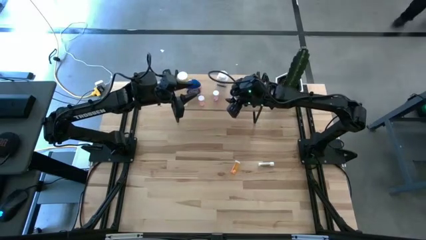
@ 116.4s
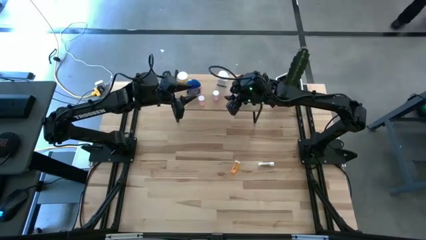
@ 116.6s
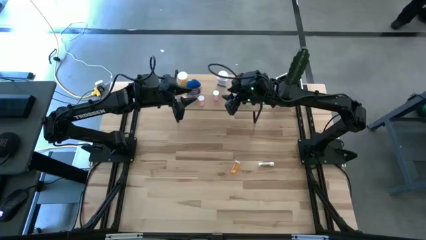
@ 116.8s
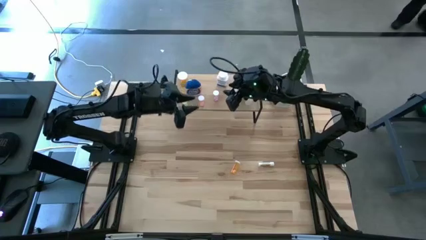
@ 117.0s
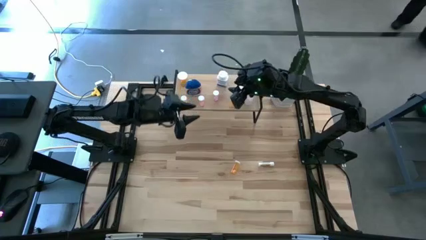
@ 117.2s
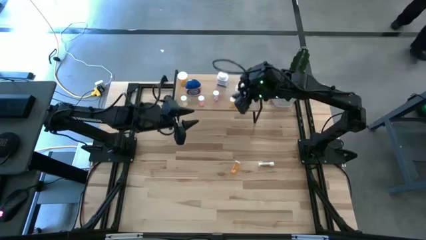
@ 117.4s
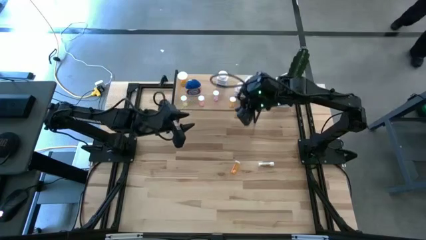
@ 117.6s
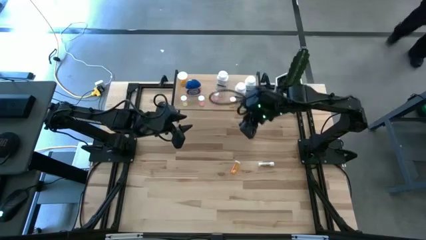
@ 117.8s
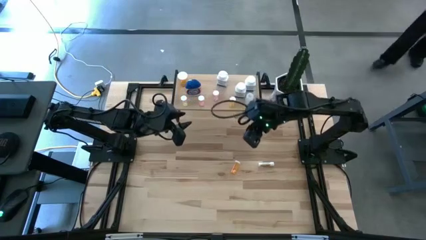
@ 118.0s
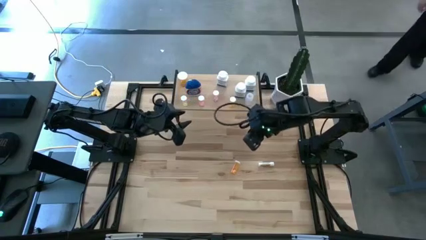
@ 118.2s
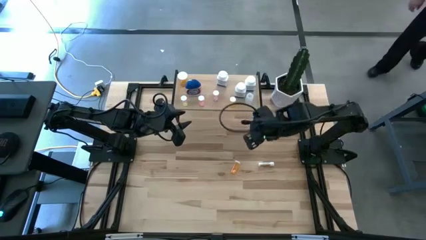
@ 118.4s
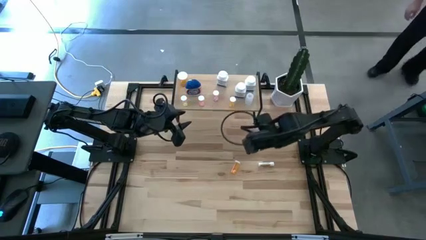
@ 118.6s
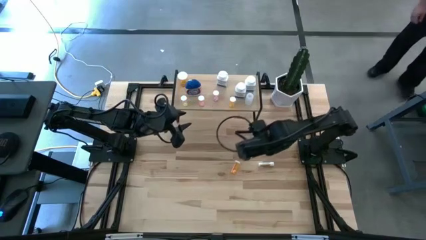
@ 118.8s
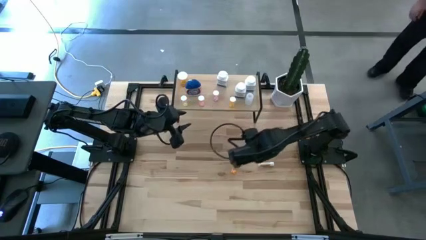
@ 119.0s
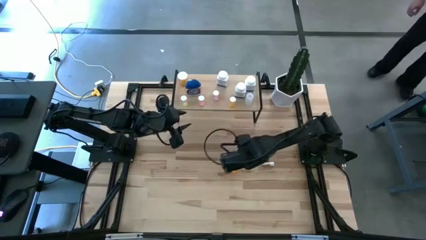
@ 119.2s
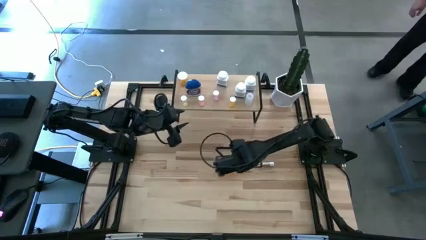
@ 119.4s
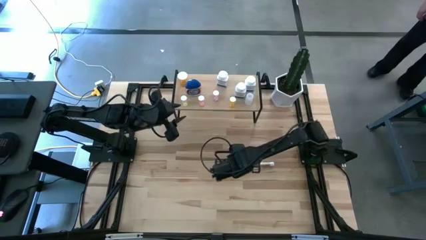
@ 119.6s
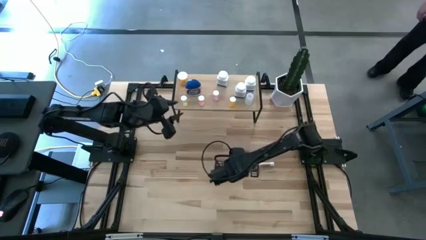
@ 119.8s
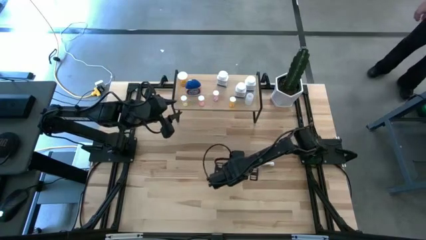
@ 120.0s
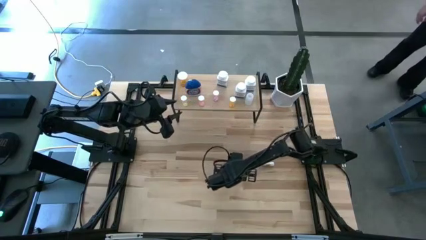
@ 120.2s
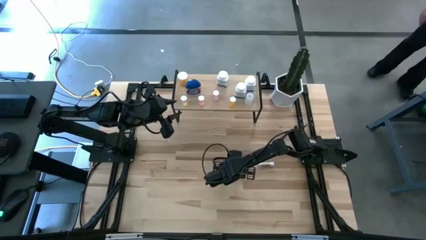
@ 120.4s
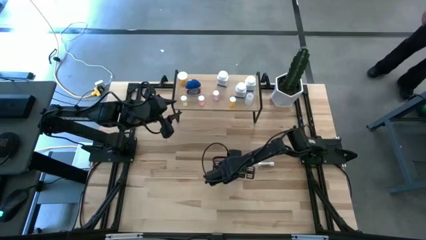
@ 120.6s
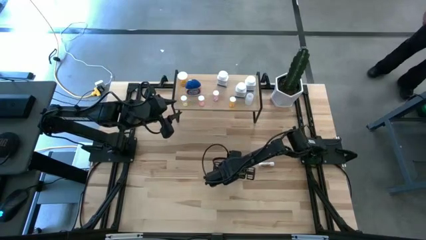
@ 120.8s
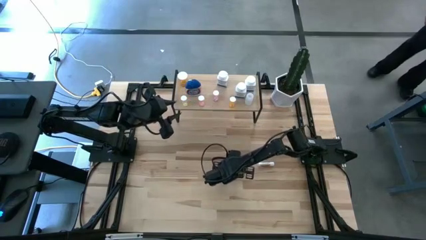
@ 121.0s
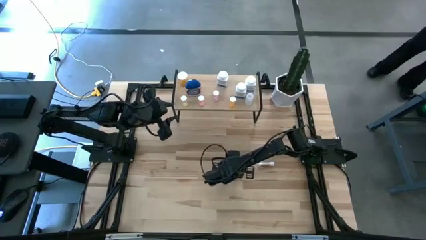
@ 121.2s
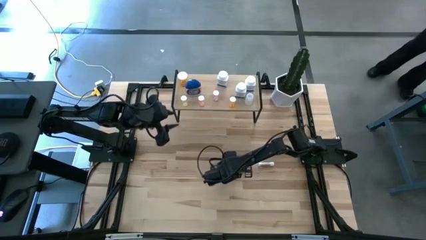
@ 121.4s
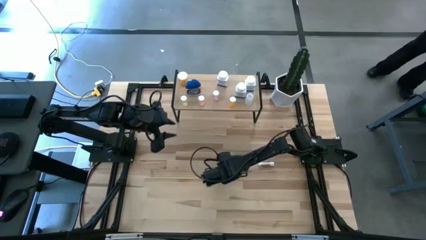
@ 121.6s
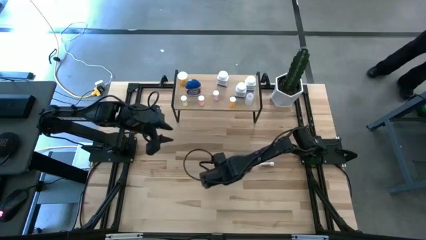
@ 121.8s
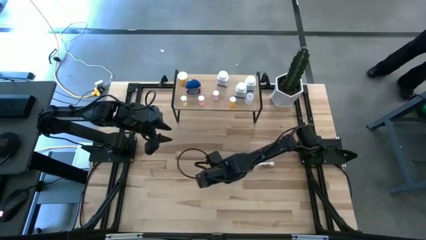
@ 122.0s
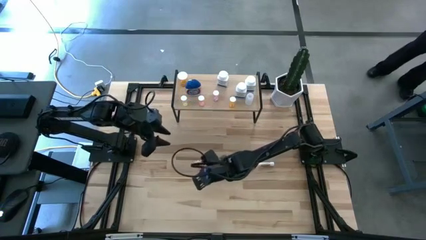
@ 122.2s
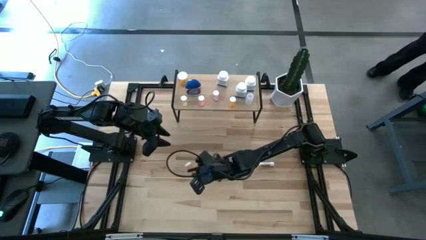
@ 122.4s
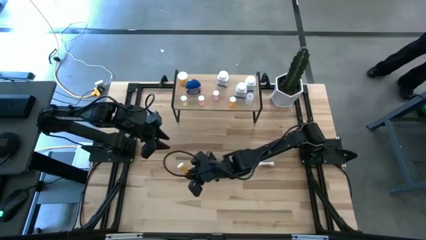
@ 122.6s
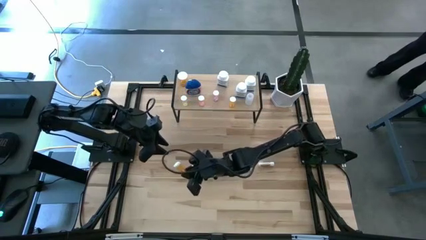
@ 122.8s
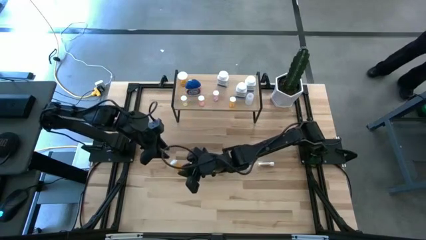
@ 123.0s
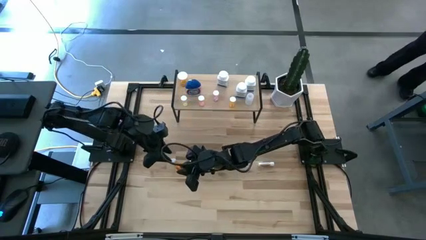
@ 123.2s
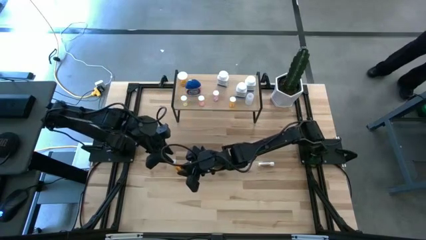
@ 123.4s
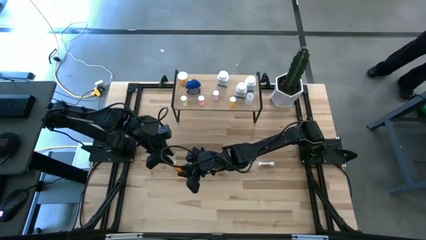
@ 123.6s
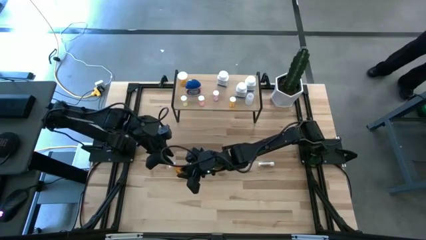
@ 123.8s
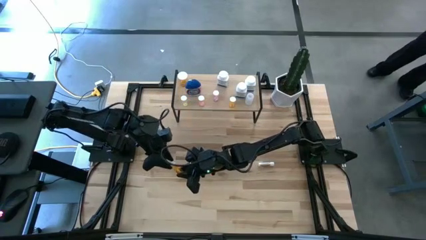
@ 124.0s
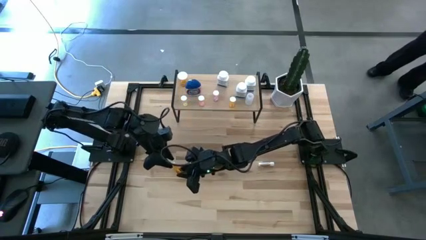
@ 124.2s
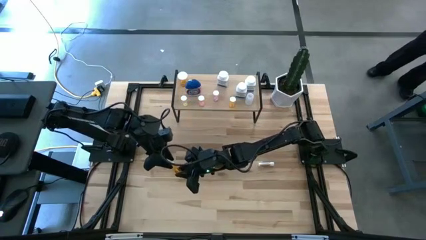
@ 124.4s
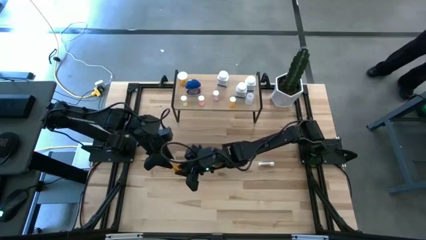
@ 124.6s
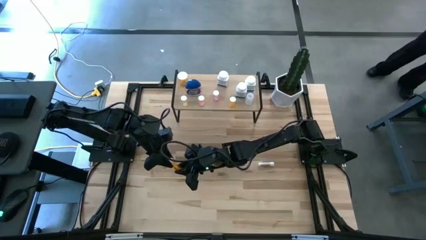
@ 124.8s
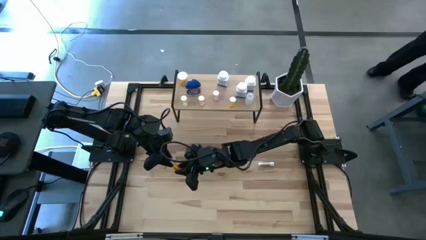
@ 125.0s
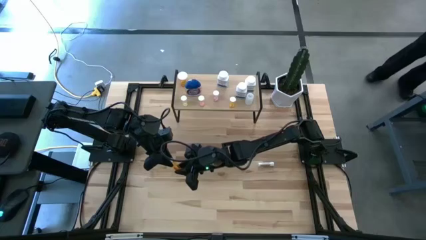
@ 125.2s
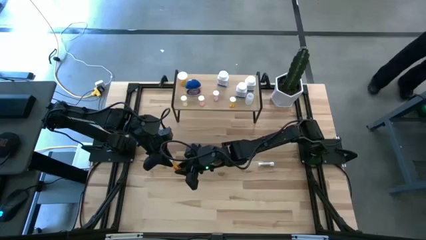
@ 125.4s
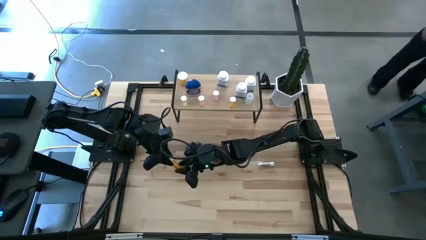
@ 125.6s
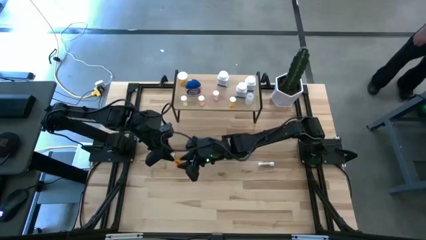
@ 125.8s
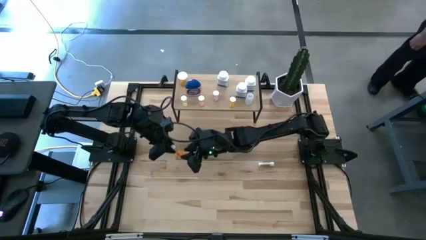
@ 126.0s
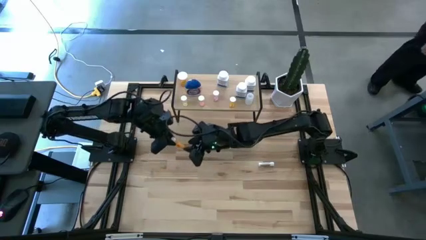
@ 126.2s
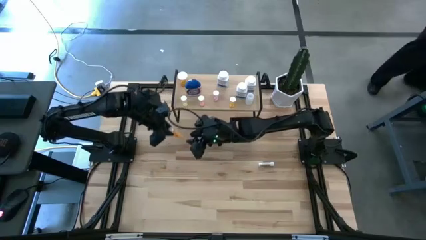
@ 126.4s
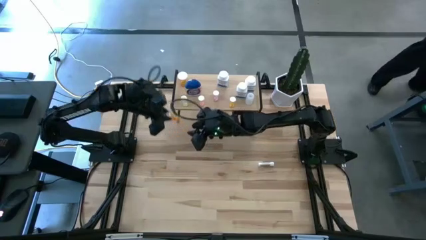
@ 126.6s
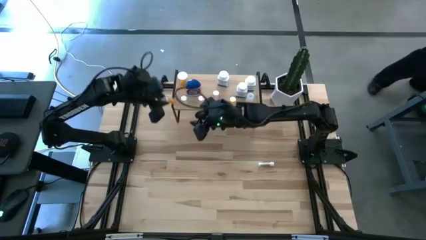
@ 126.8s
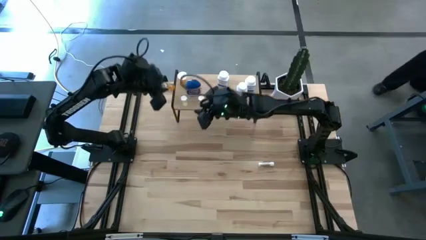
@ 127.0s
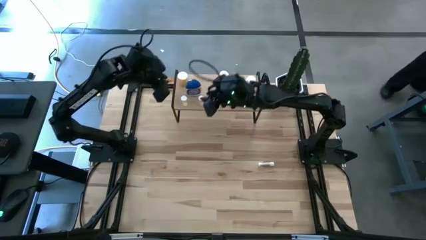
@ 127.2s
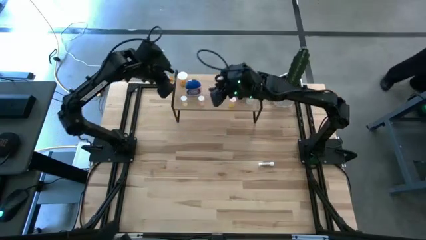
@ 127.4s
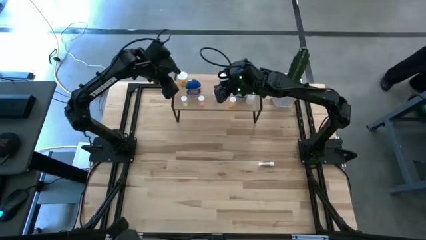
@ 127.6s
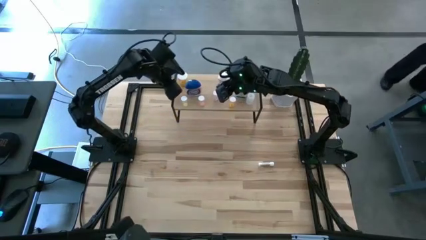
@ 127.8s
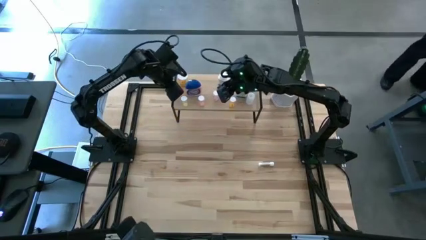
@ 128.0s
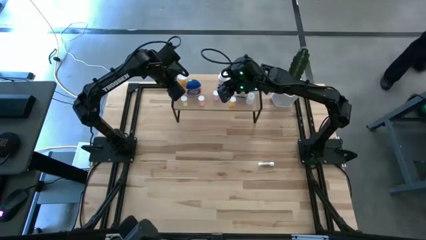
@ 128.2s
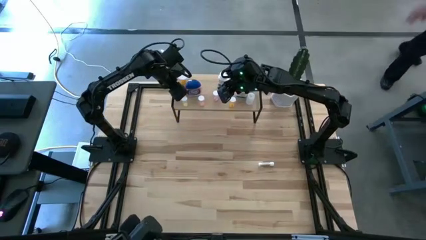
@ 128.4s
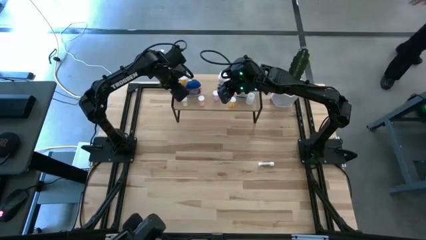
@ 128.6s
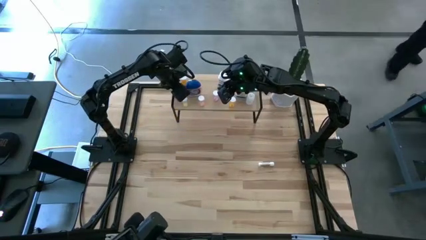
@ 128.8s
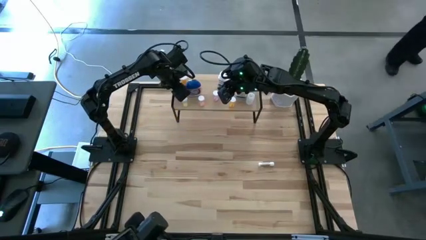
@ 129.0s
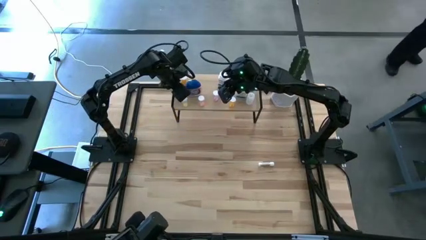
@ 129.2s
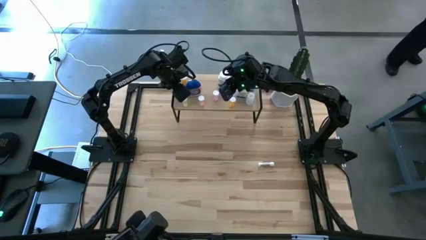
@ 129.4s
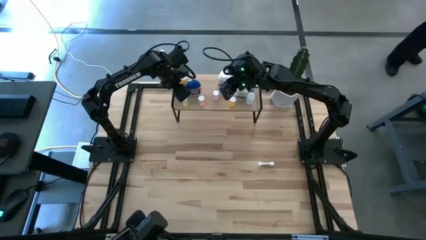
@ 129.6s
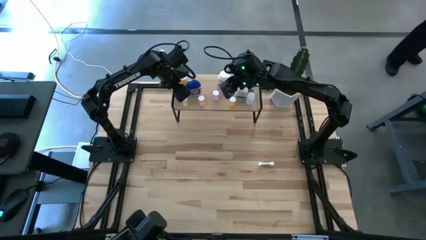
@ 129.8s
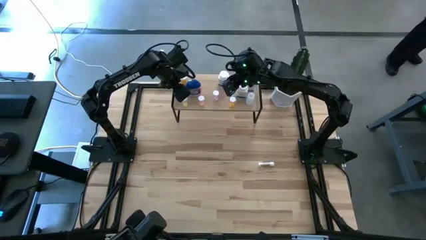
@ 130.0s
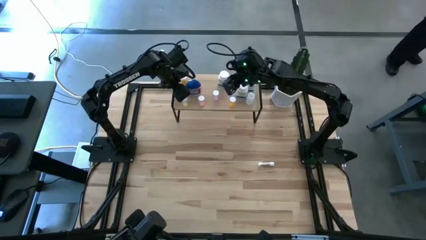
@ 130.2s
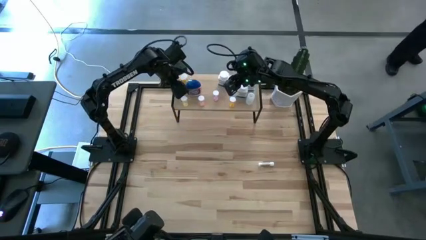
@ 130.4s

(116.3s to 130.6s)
Task: Pick and place medicine bottles onto shelf by color
Put the small orange pill bottle on the shelf

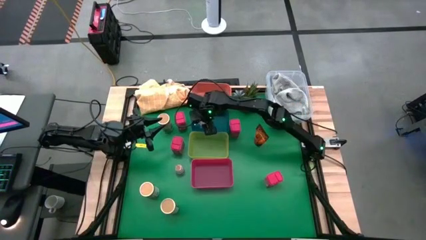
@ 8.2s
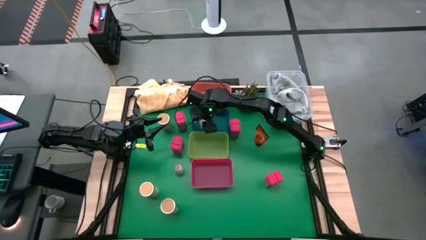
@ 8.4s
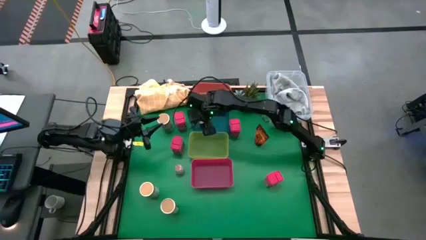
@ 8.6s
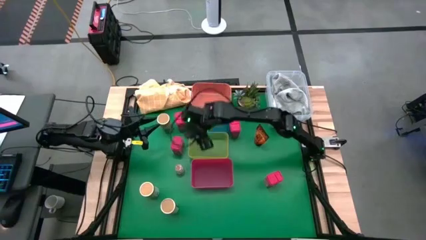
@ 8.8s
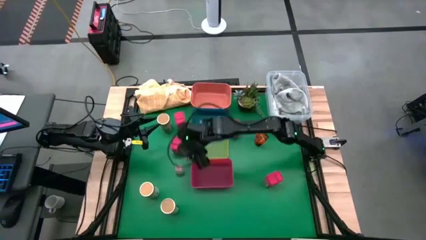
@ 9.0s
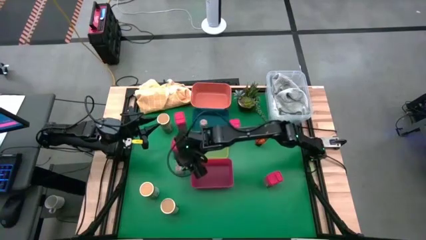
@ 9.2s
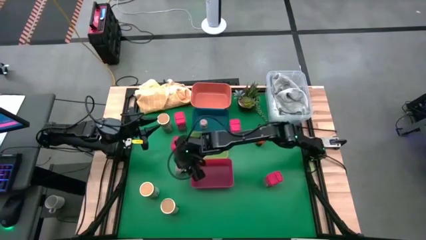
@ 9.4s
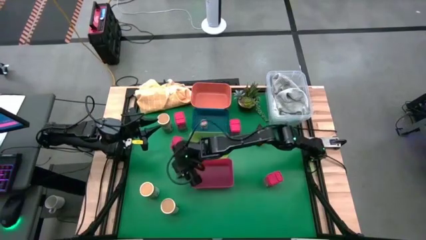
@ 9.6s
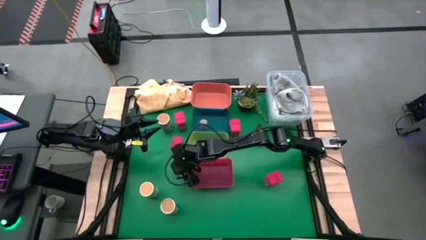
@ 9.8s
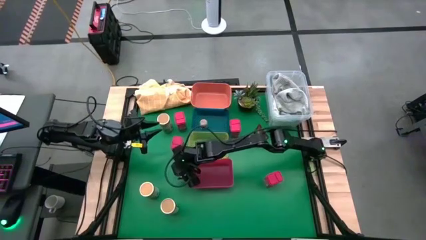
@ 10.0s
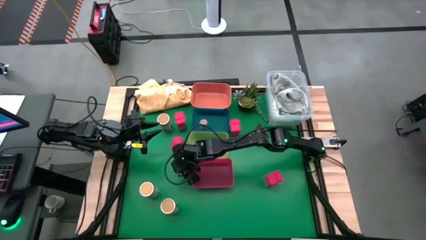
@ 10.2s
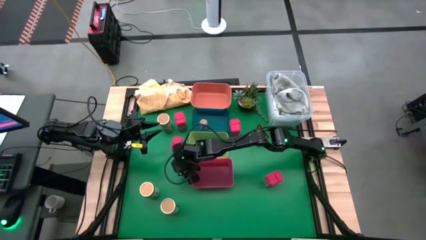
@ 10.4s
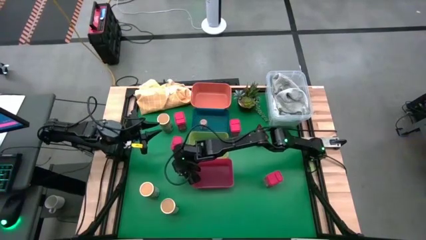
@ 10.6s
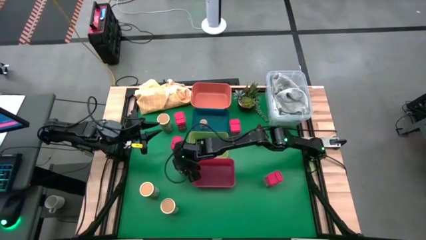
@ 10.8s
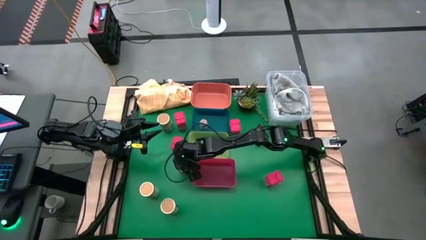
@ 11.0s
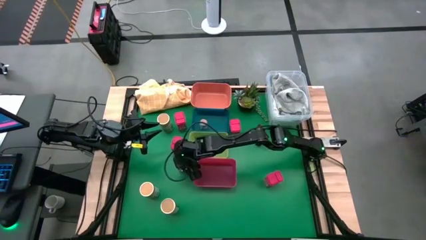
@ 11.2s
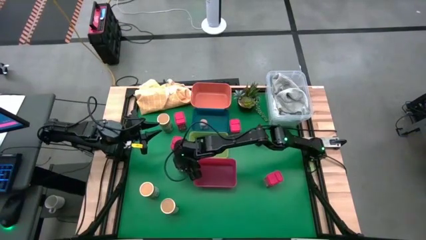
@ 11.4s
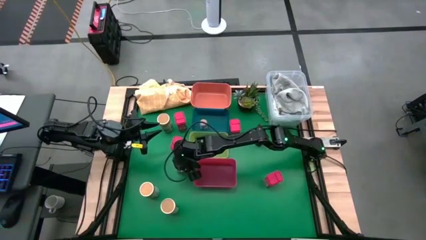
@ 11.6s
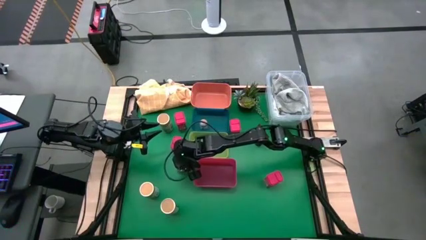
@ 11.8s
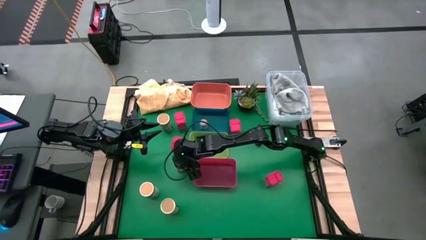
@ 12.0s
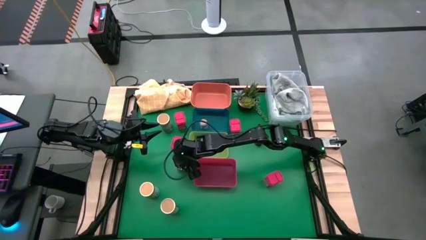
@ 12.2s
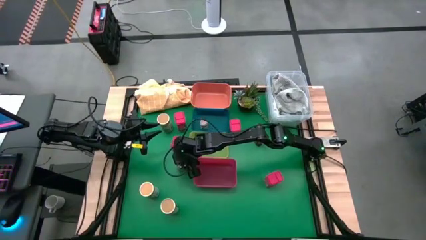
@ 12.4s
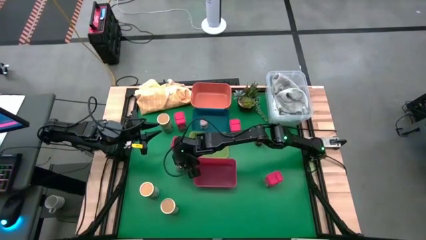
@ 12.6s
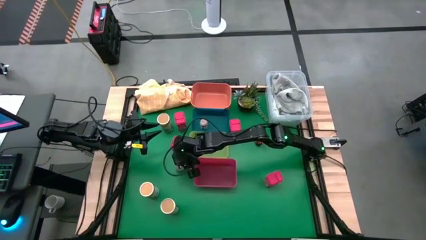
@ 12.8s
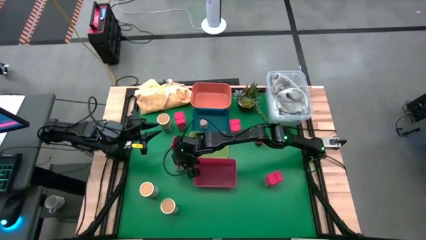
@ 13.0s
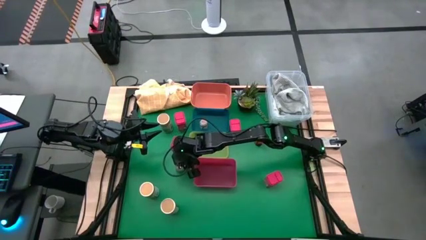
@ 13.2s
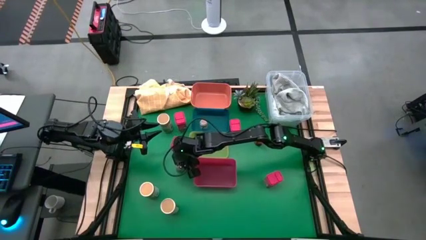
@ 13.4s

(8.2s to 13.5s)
Task: Sort spices by type
Put the brown seasoning bottle into the blue bin
